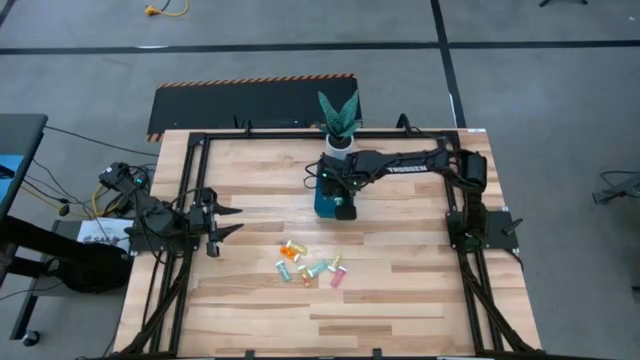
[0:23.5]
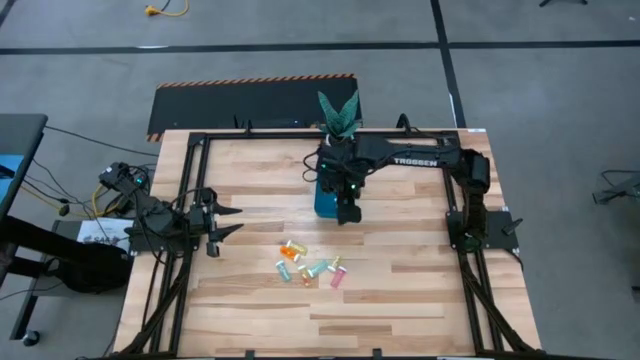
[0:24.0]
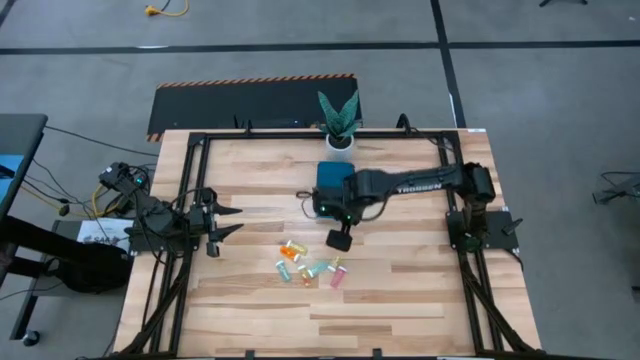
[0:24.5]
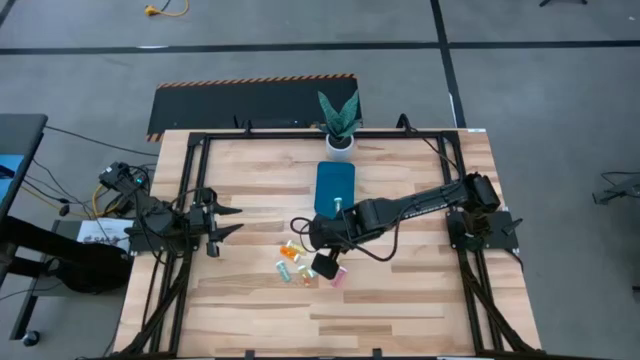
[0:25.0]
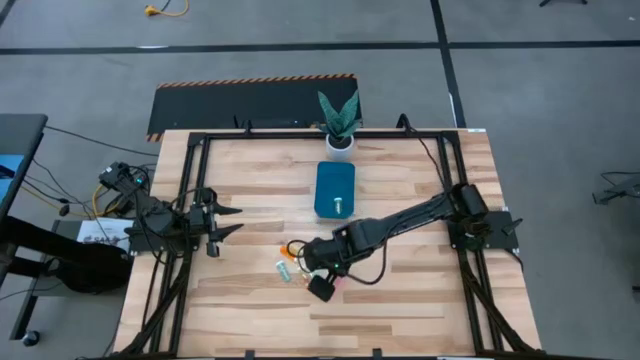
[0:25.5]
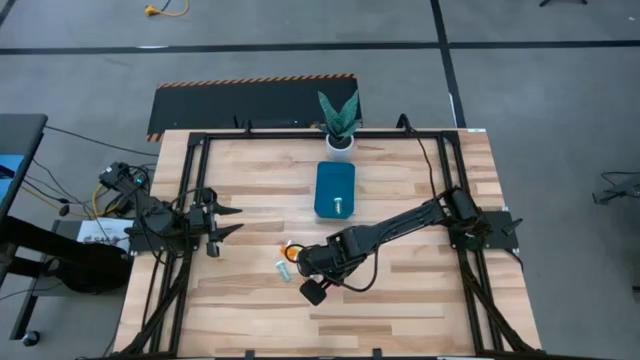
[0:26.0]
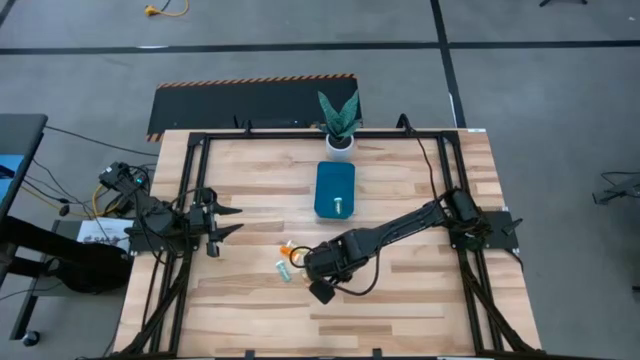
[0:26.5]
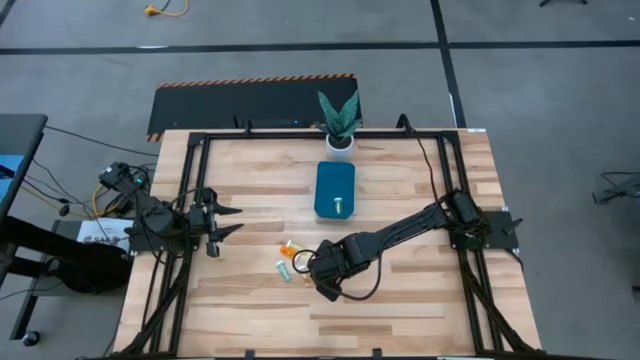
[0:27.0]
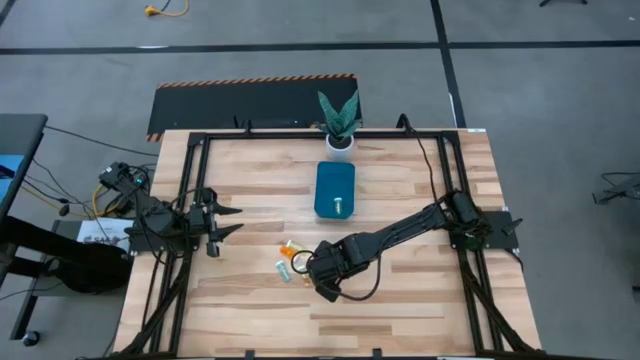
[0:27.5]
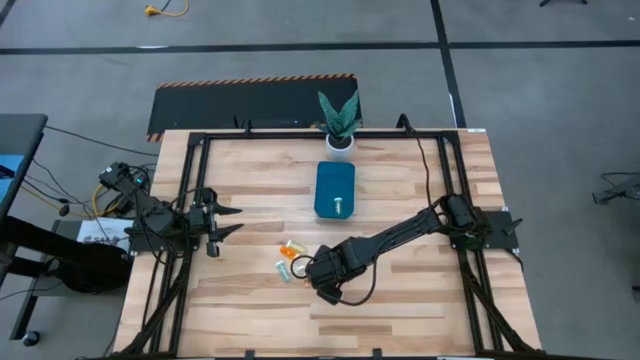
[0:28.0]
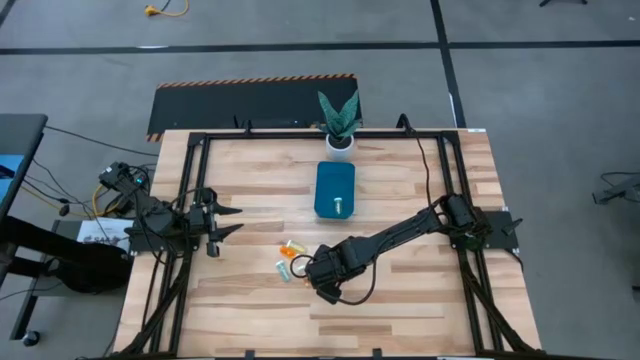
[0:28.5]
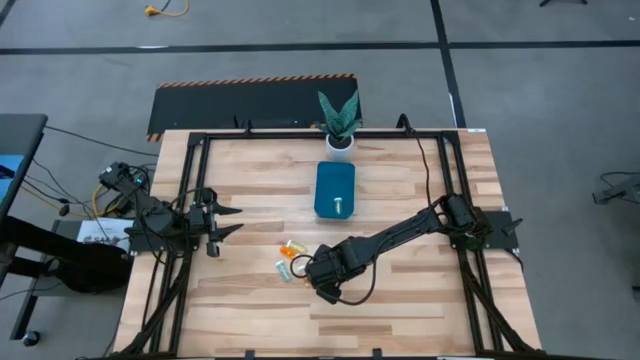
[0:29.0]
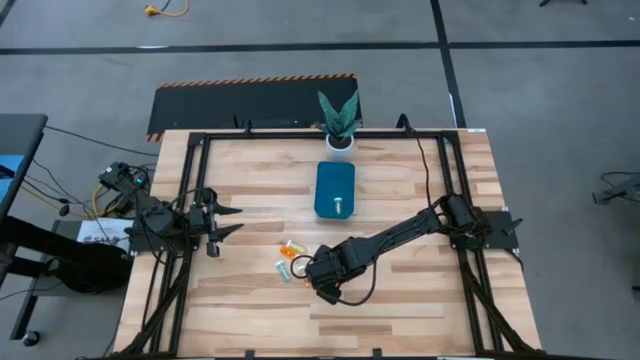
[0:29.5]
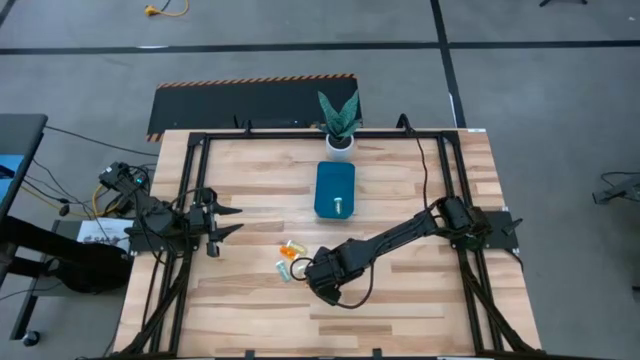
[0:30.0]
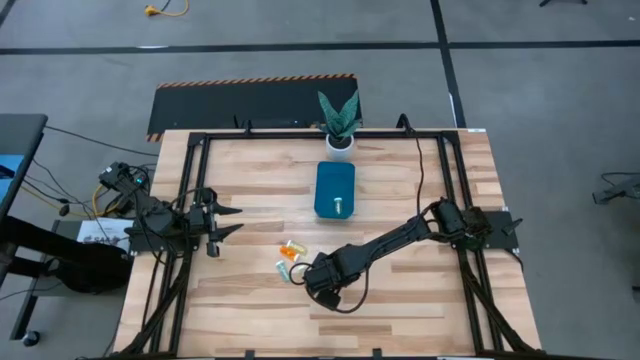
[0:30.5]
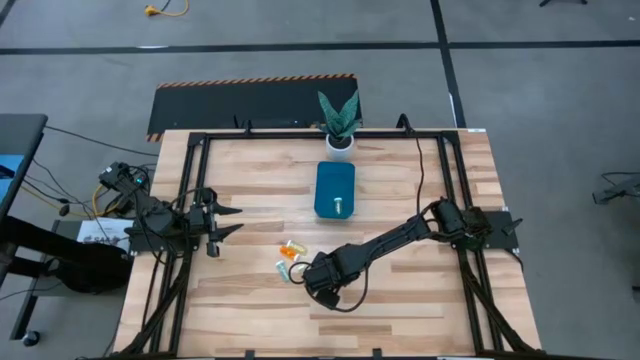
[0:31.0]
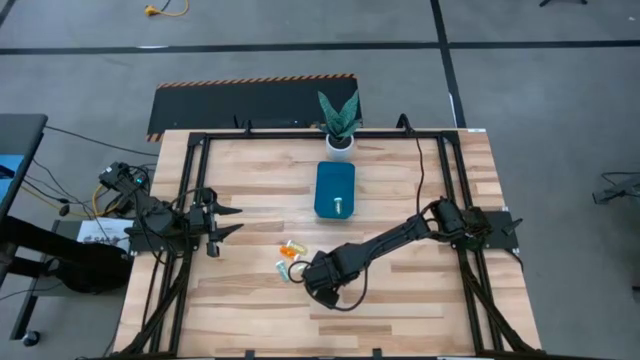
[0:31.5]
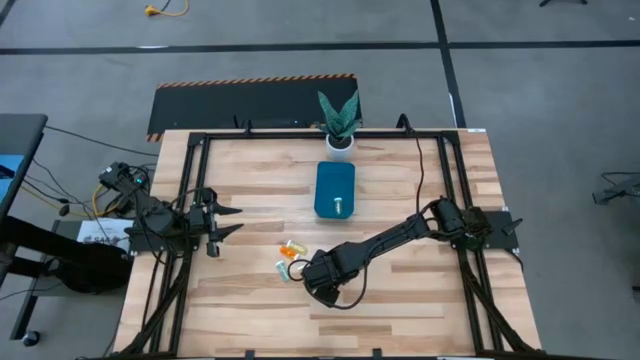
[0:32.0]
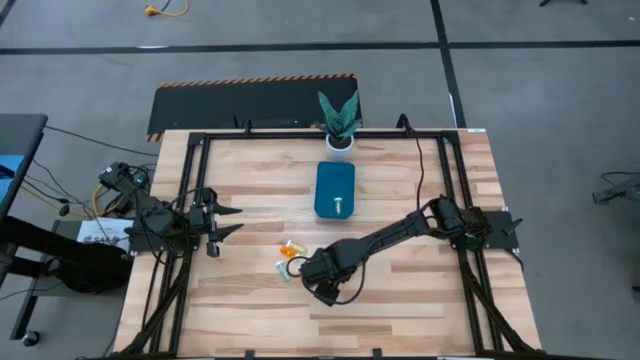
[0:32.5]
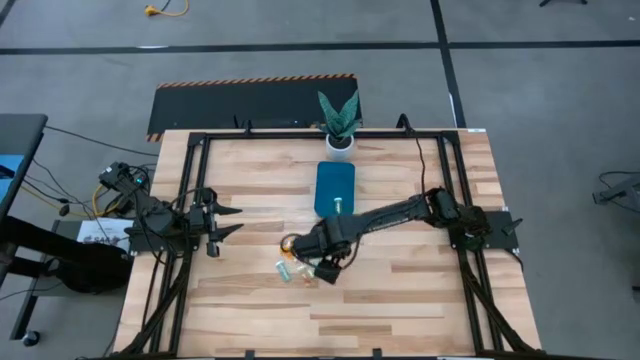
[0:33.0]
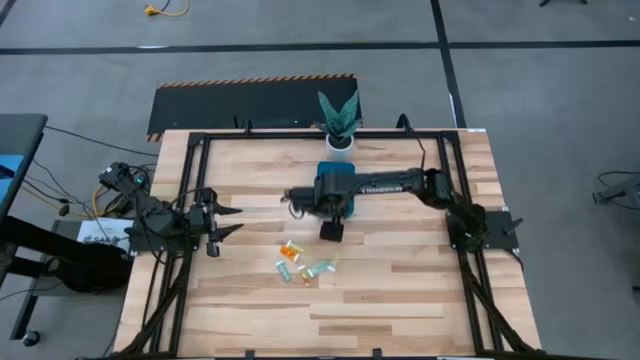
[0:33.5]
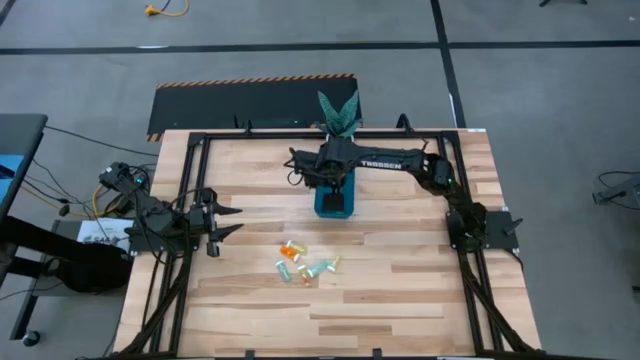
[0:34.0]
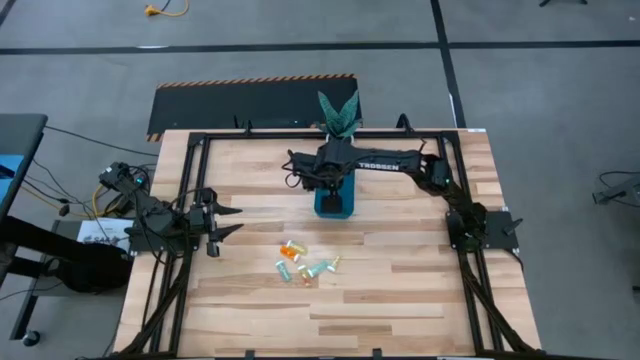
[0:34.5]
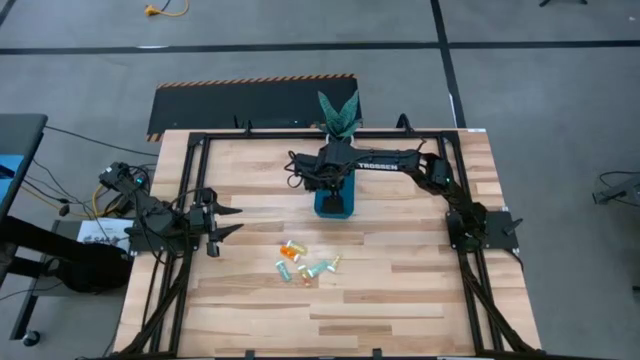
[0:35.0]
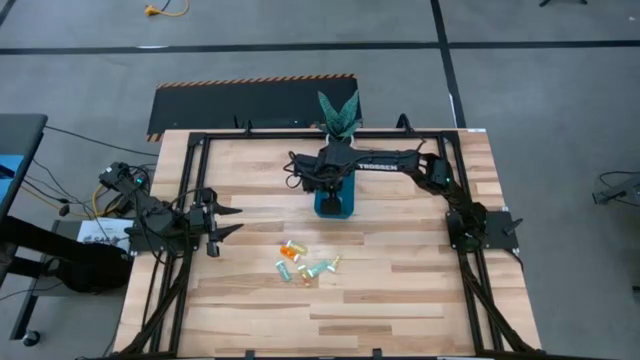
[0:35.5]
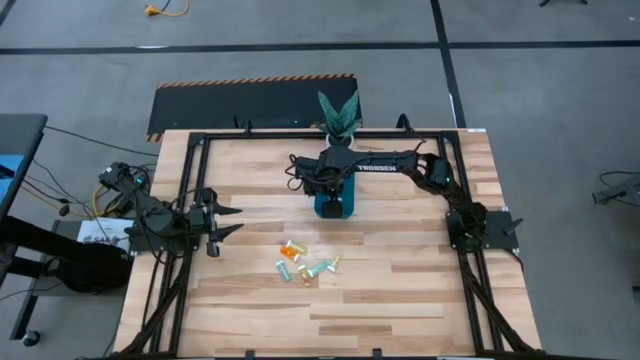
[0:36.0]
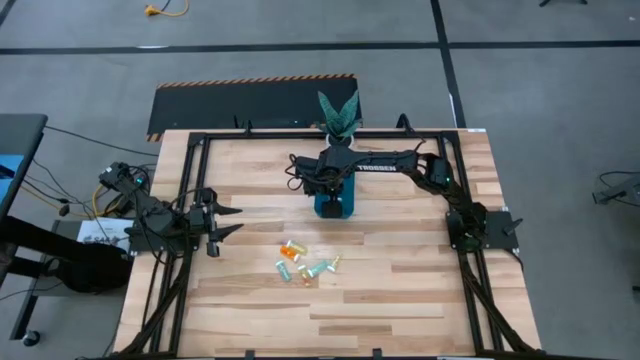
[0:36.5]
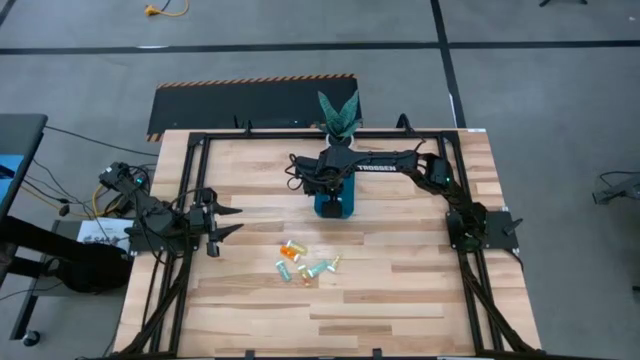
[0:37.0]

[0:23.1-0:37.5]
Task: Pick and place pill bottles into a basket
Put the pink pill bottle into the bin
